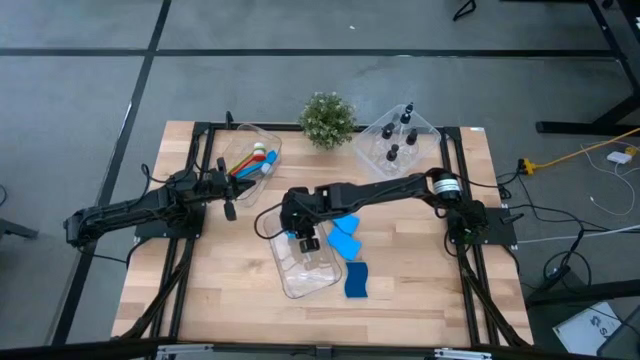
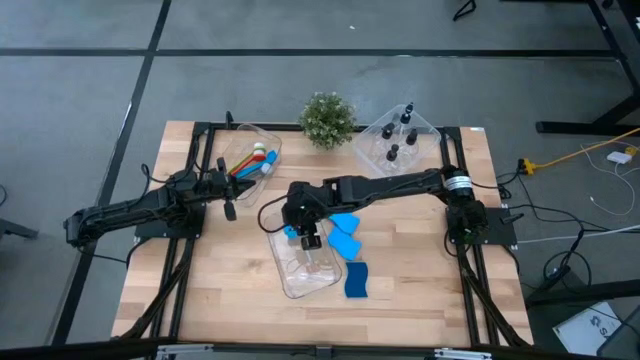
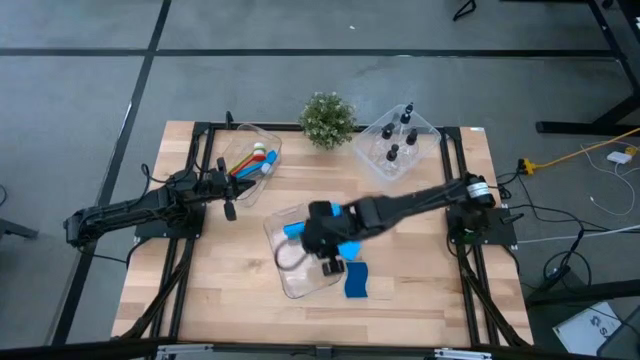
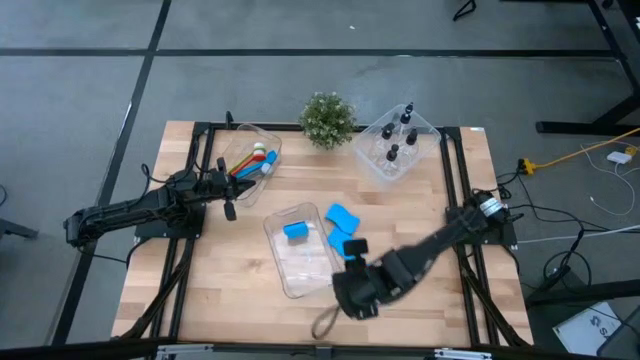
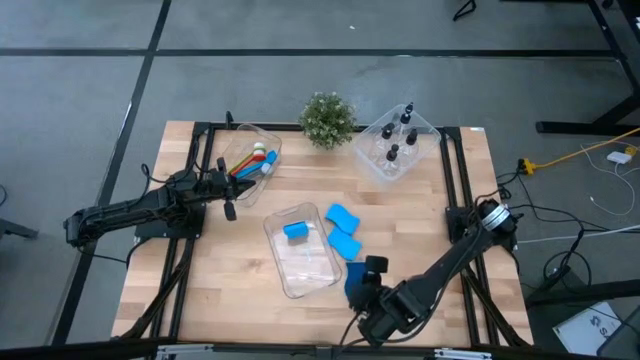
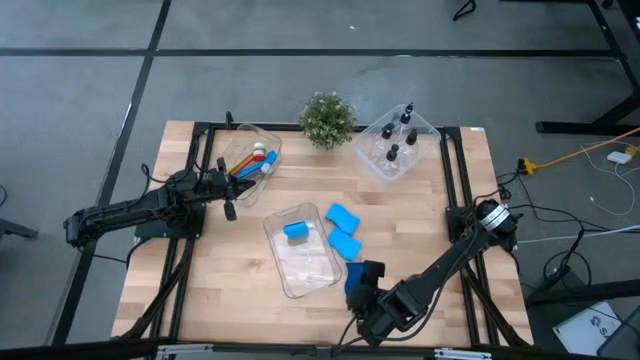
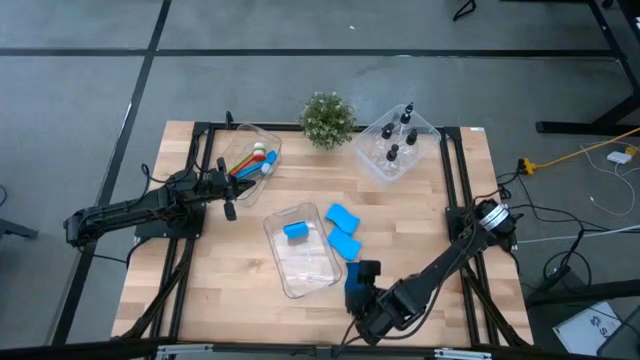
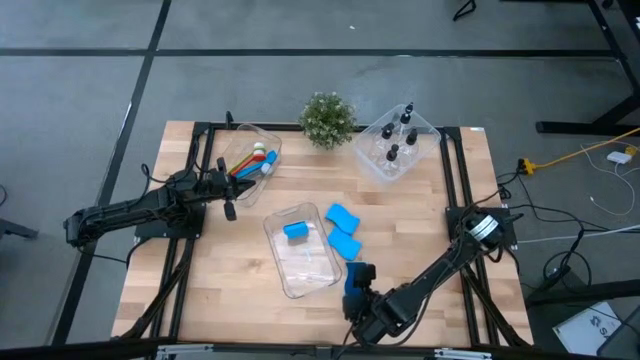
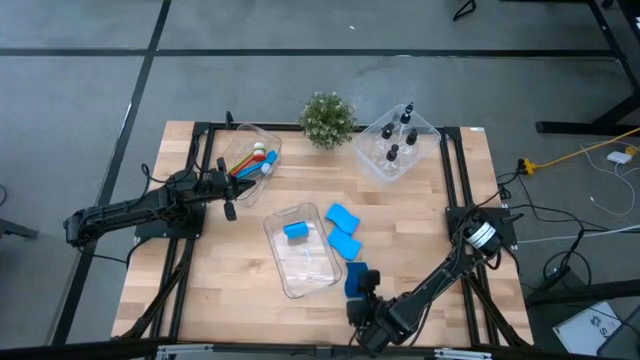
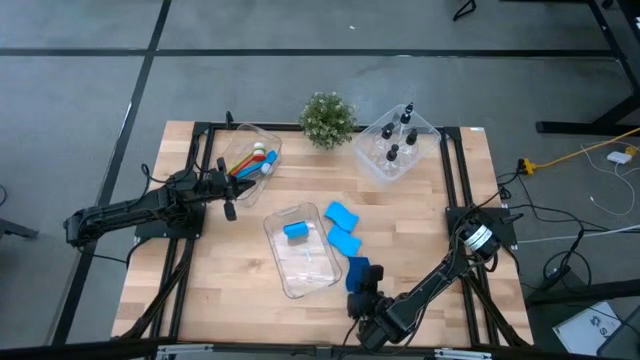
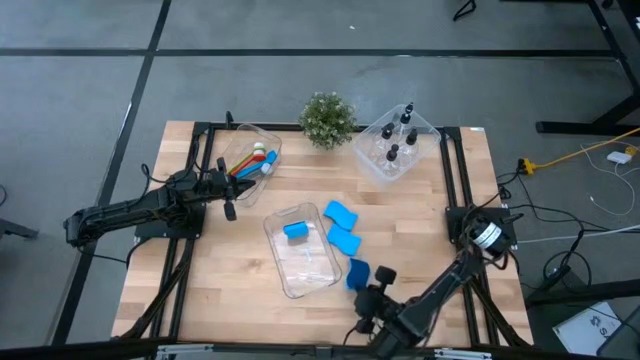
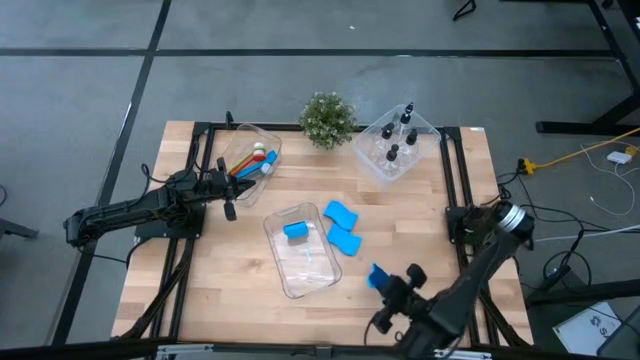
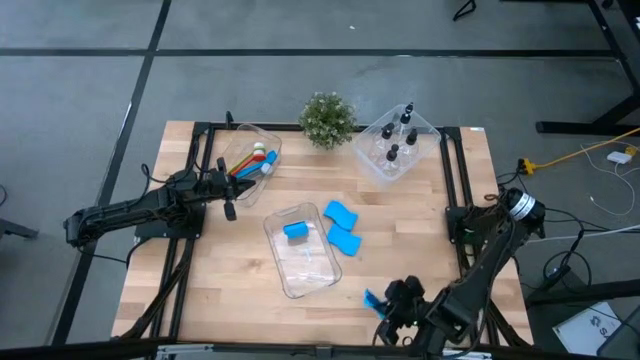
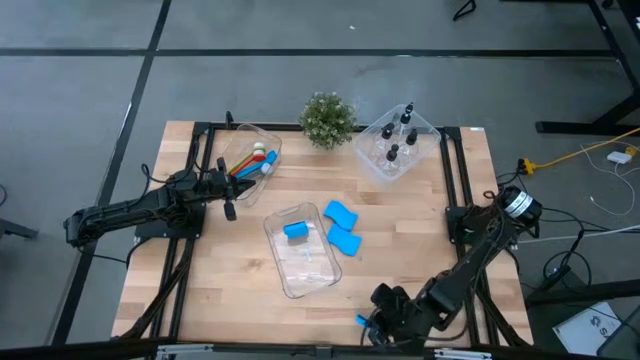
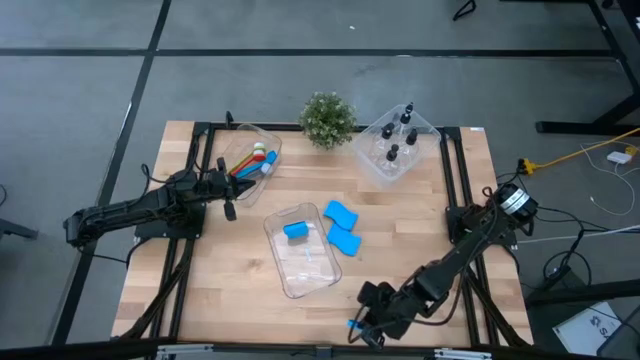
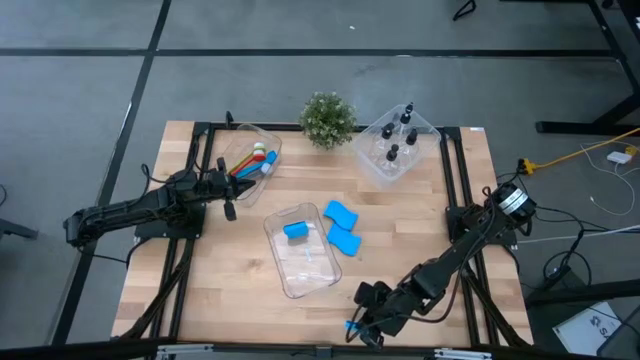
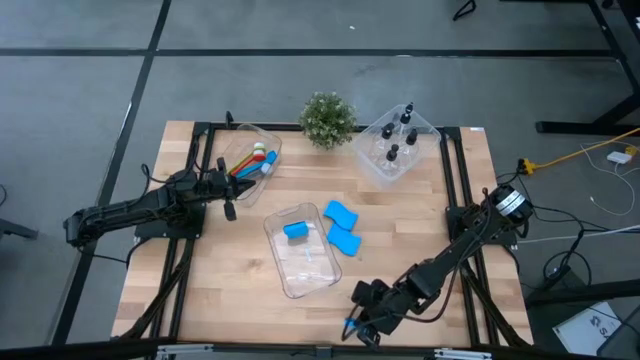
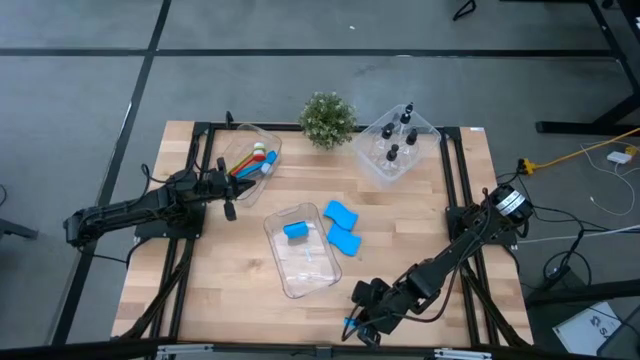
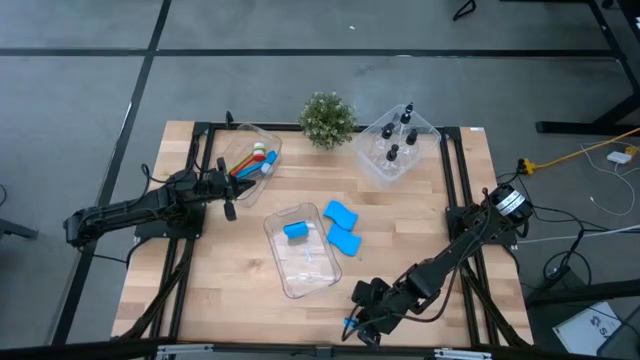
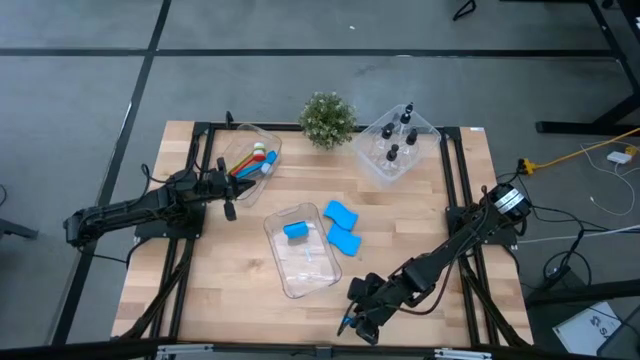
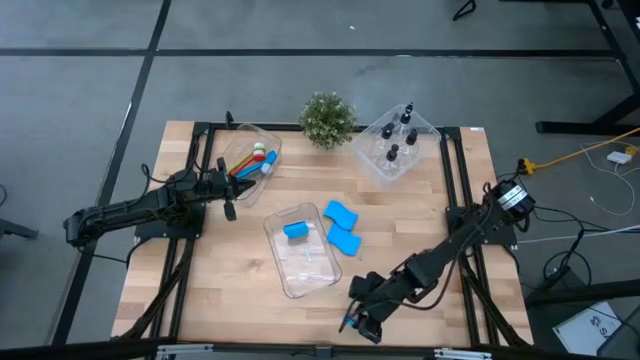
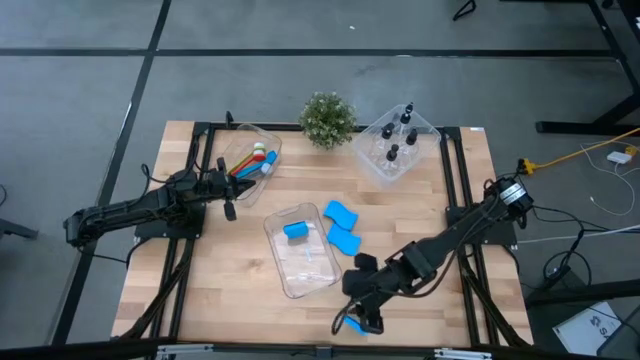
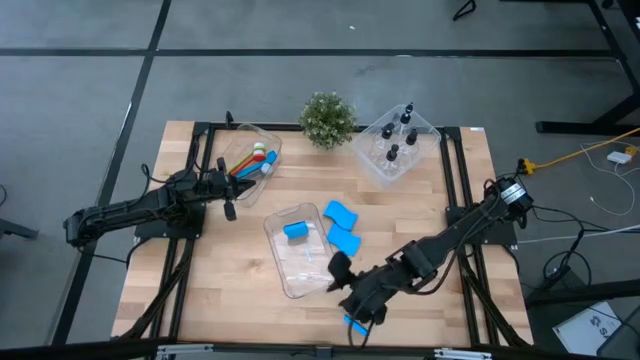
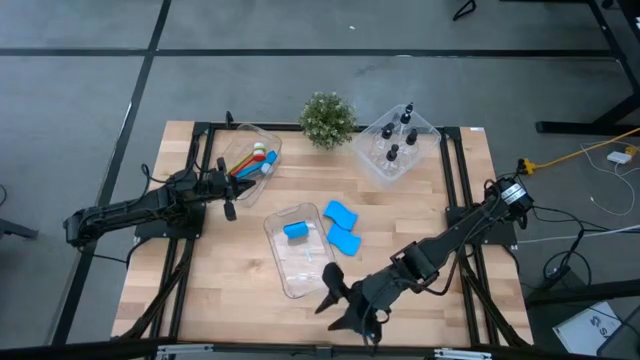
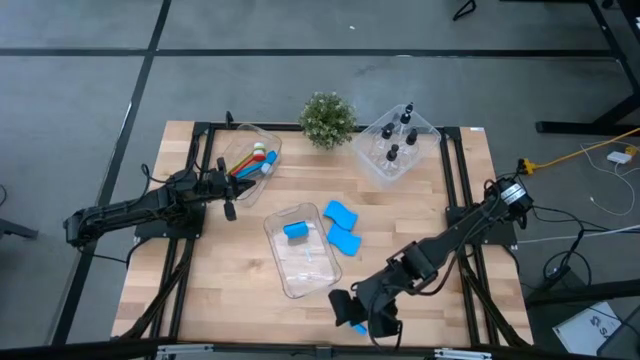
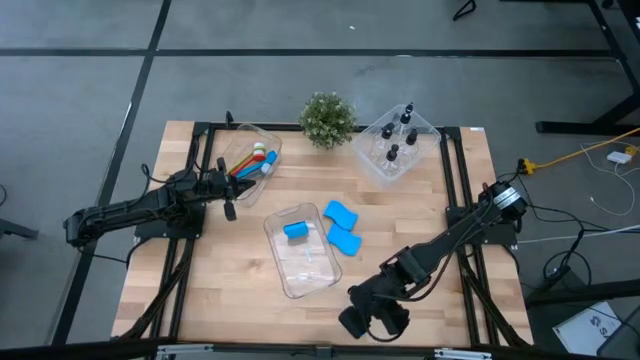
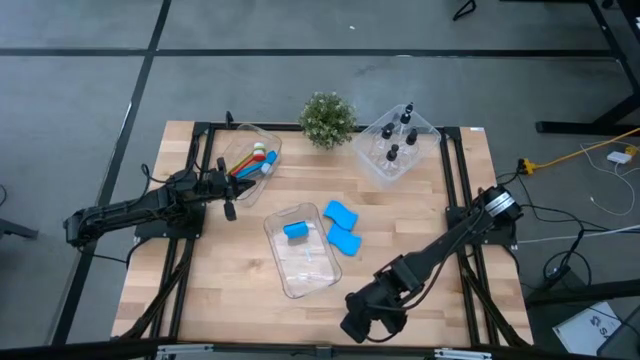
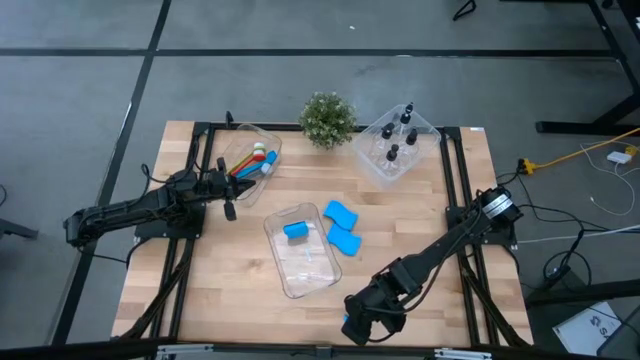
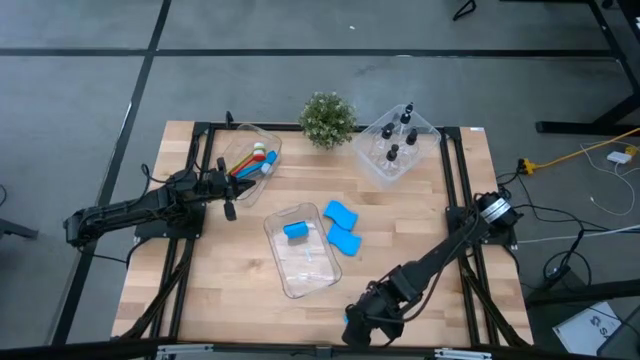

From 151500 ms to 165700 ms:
Task: Pick & Place Kitchen Sink Supplies
Put the sponge into the bottom transparent bin

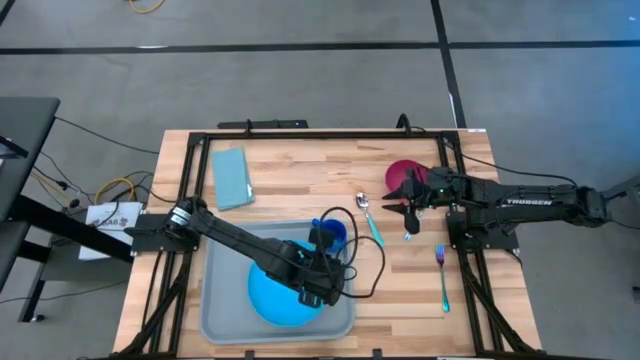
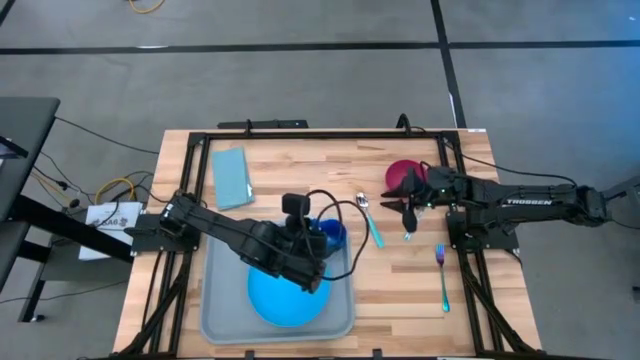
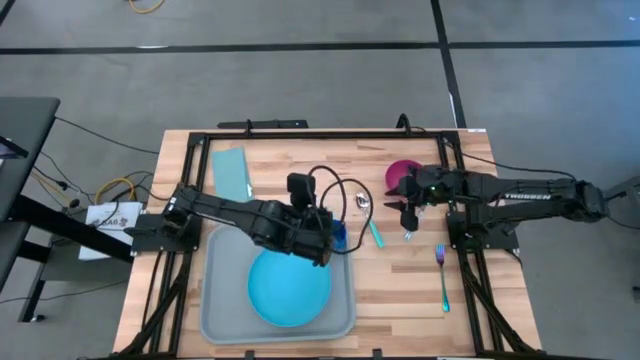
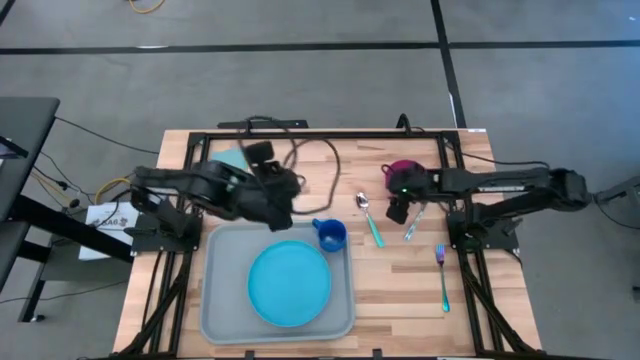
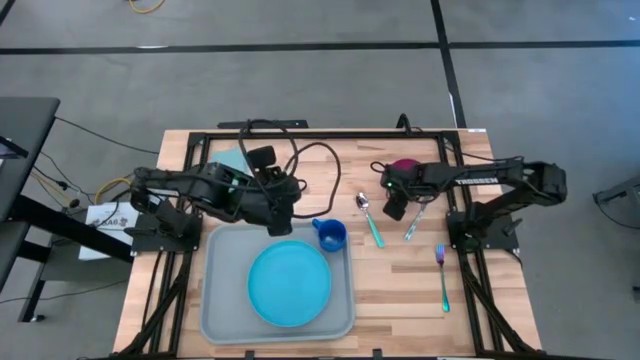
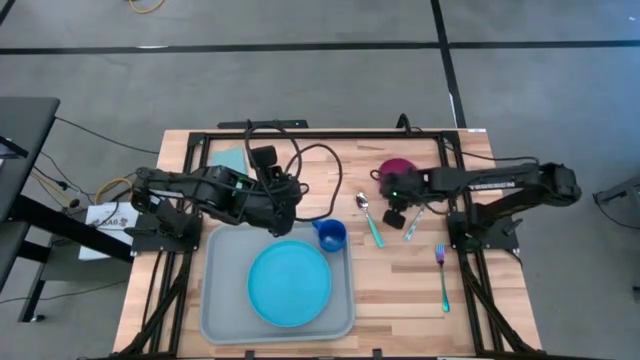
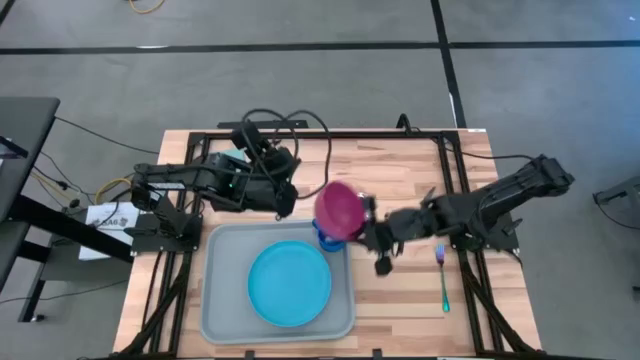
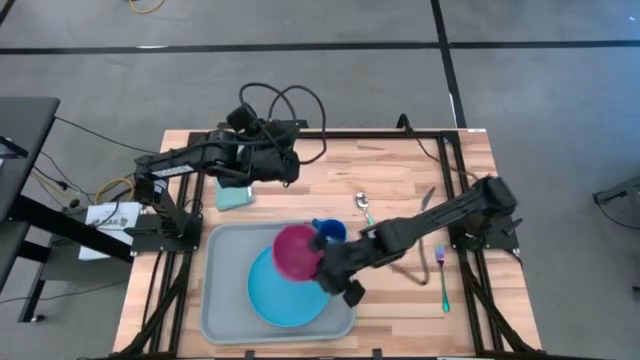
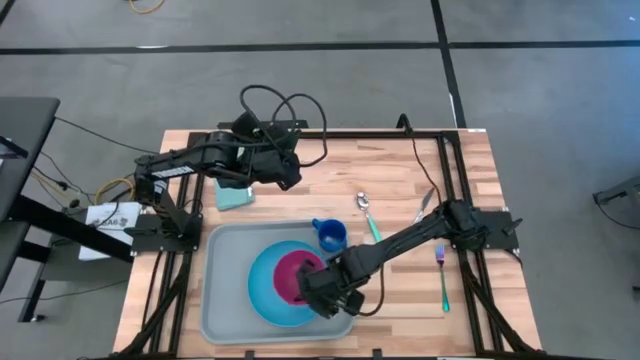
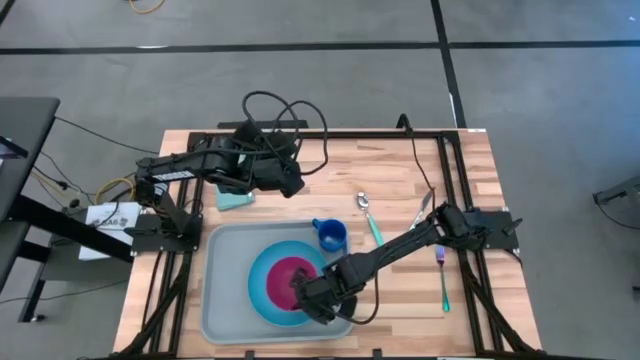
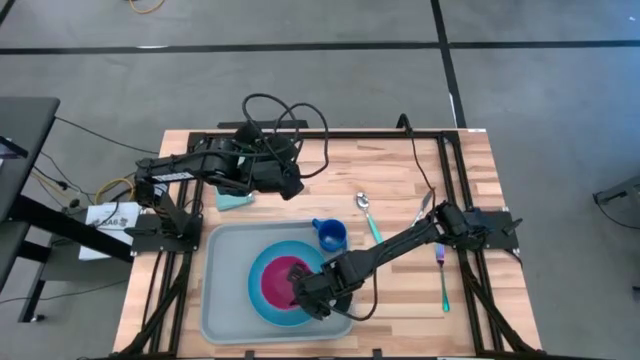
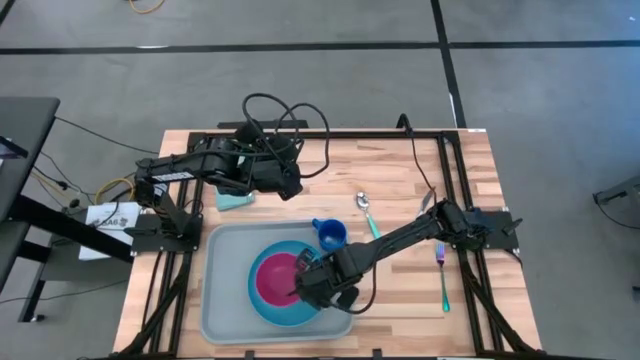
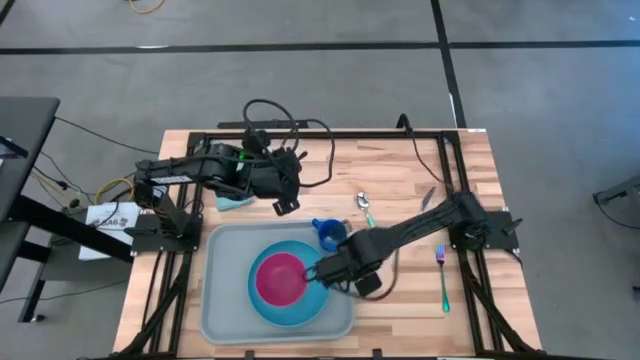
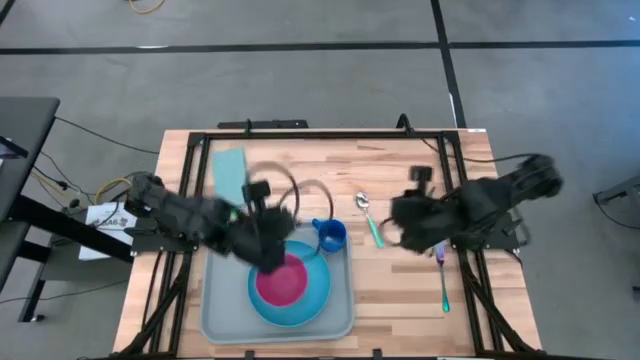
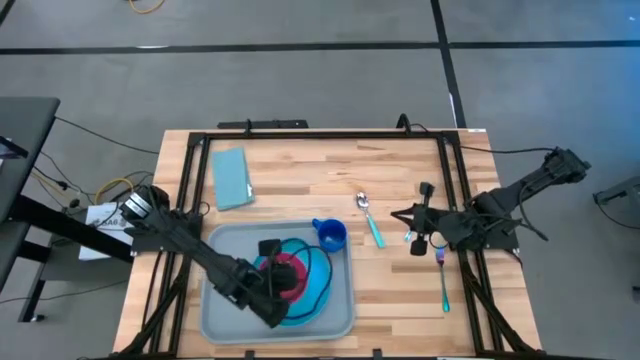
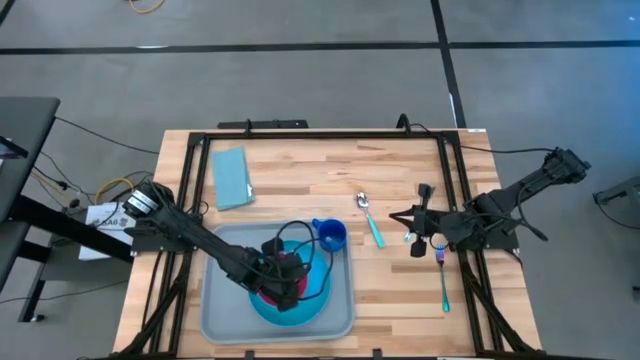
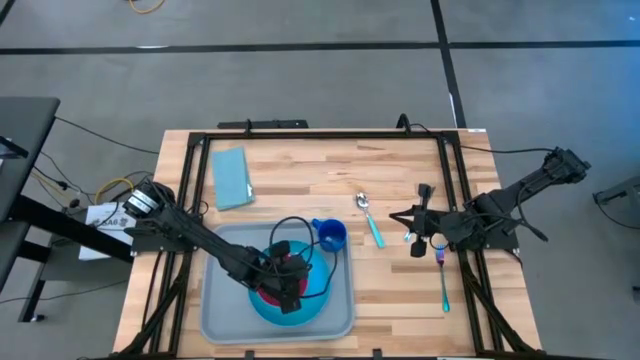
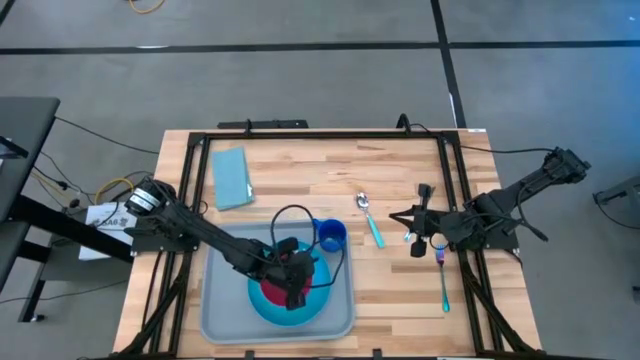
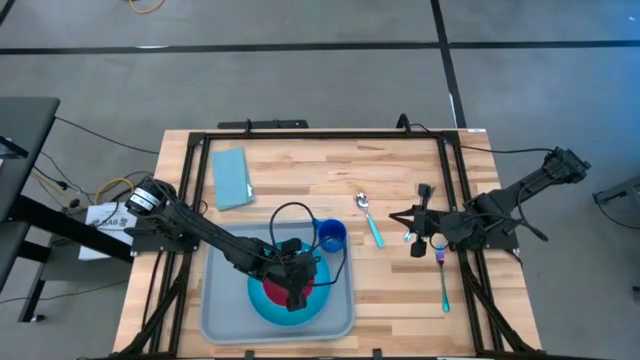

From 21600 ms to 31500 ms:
Task: Set up tray
Put the pink bowl on top of the blue plate on the gray serving tray
